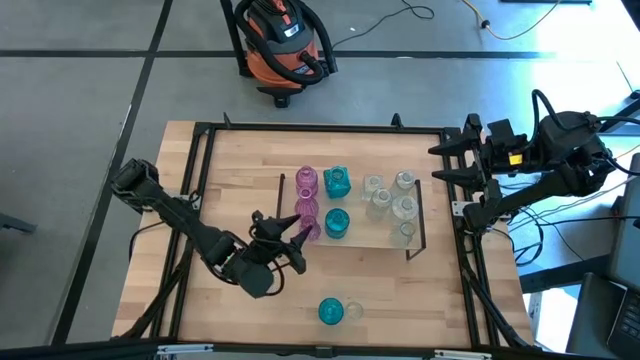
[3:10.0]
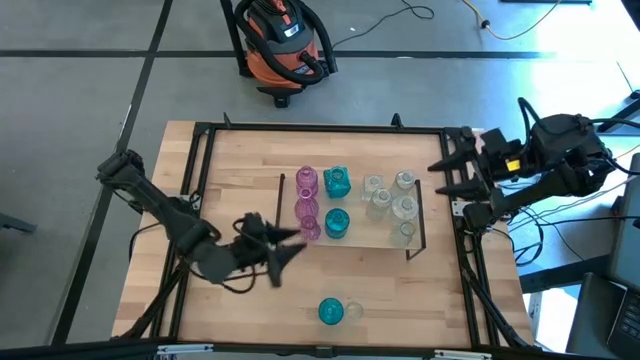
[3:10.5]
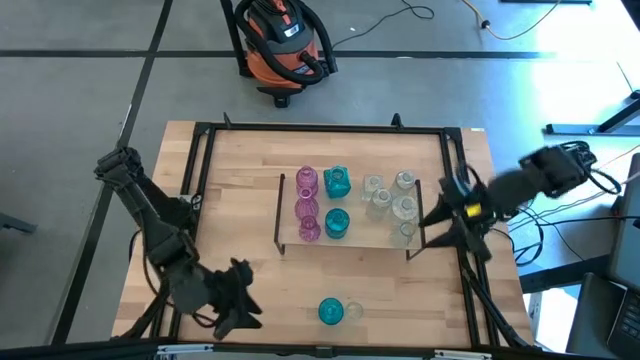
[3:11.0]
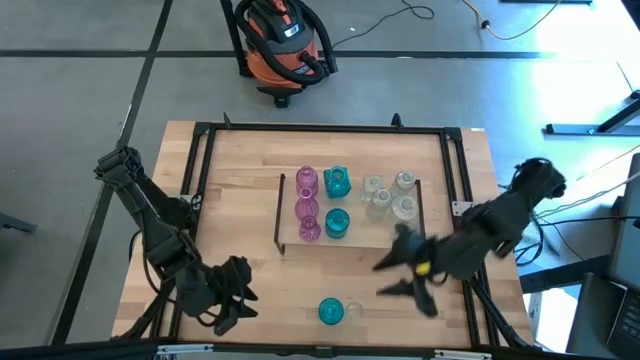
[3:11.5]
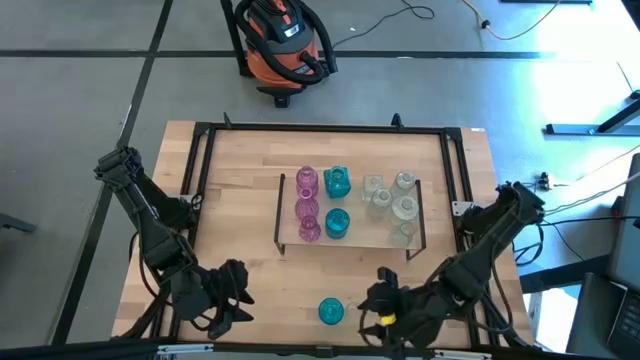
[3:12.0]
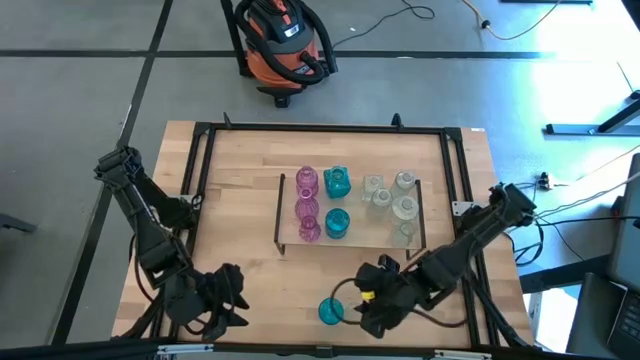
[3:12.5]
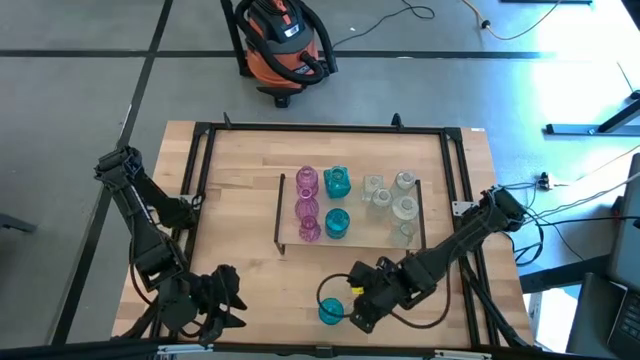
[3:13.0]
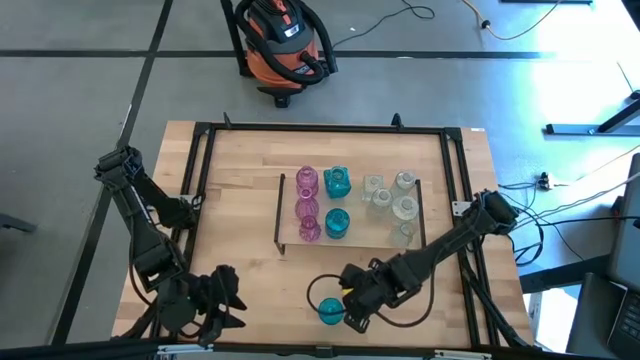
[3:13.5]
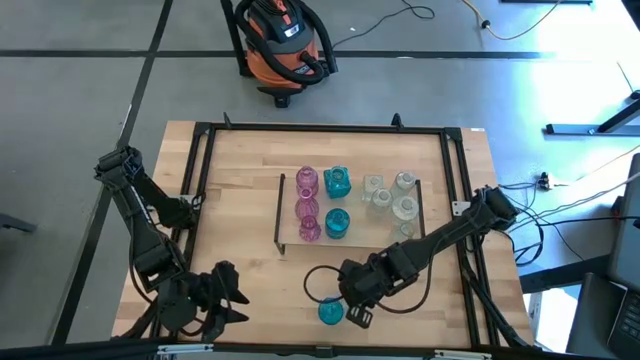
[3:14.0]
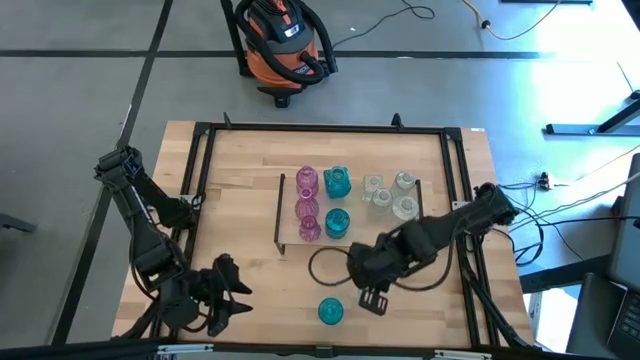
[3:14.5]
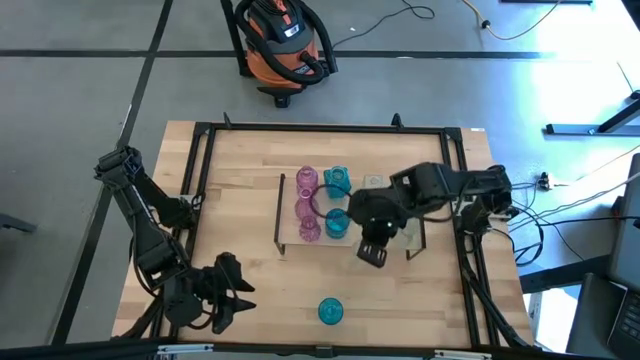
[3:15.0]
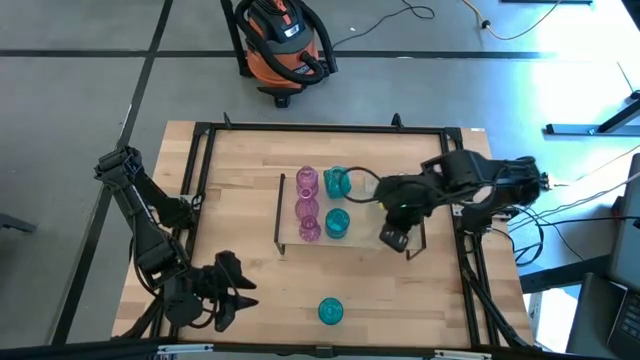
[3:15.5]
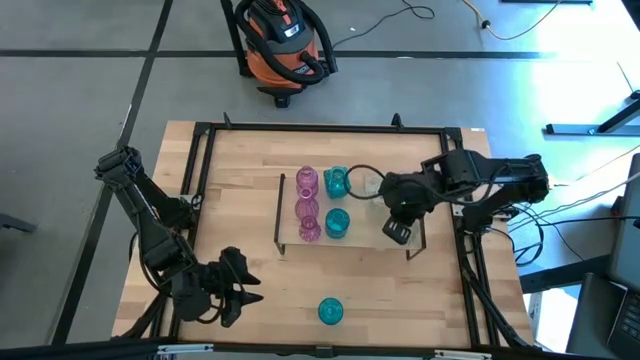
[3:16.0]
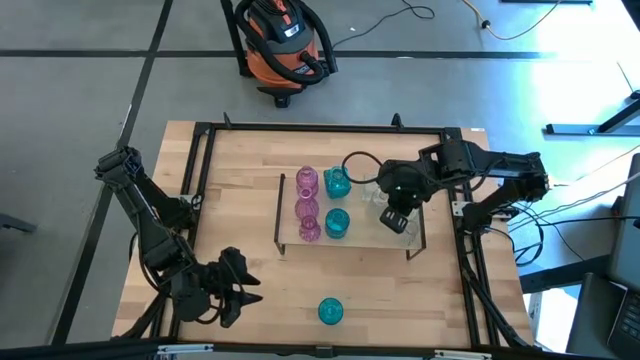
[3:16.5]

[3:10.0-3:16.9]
Task: sort vases onto shelf
Put the transparent vase on the shelf aligned with the other transparent vase

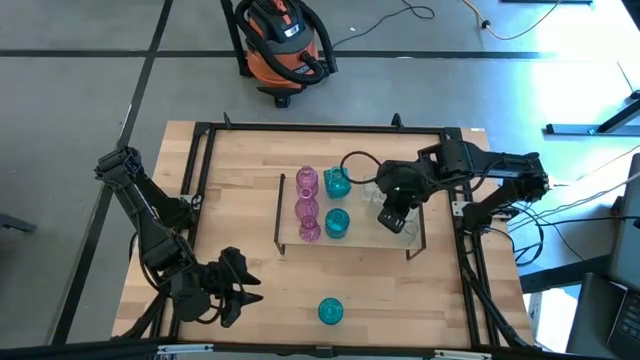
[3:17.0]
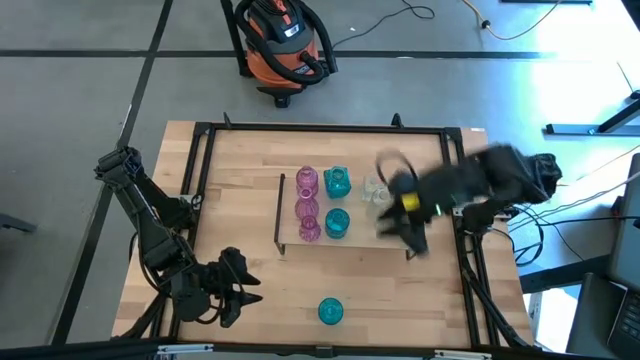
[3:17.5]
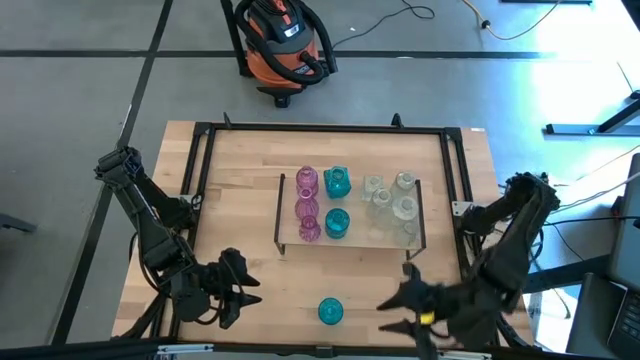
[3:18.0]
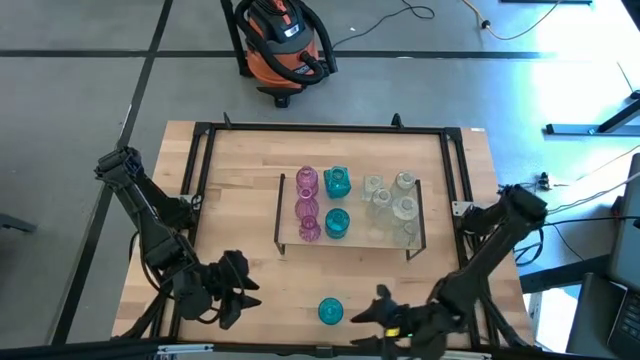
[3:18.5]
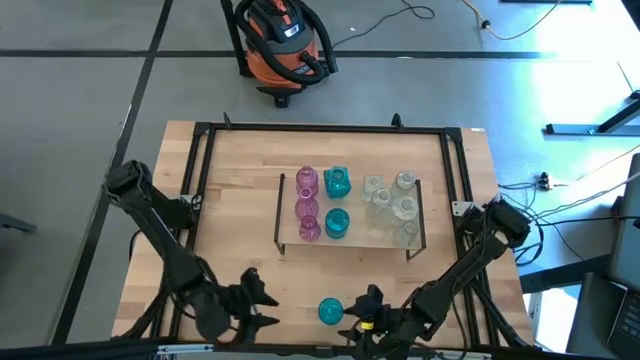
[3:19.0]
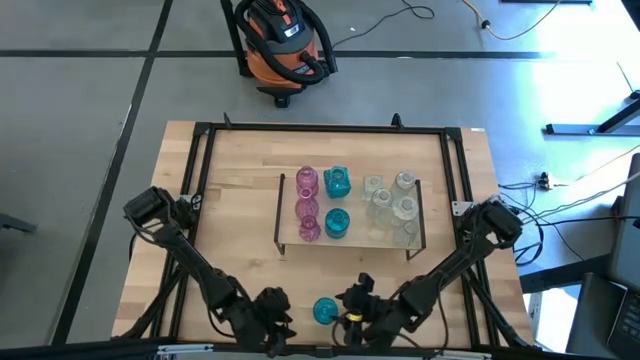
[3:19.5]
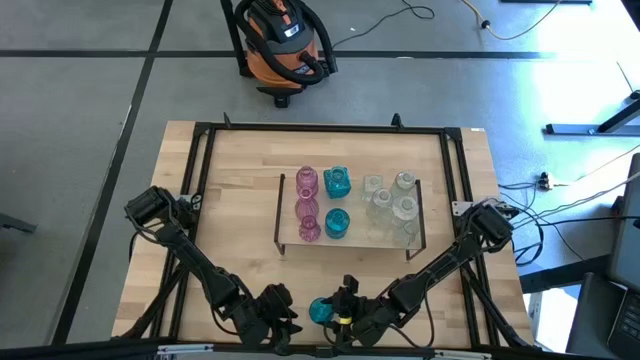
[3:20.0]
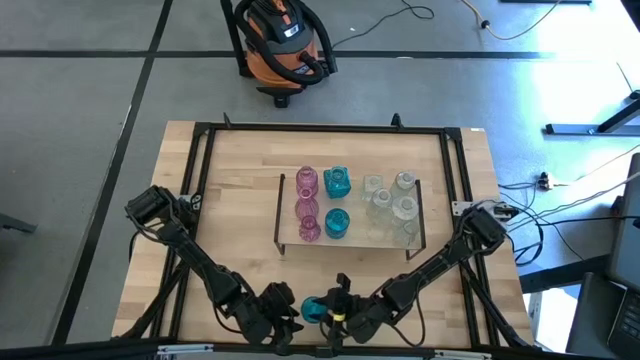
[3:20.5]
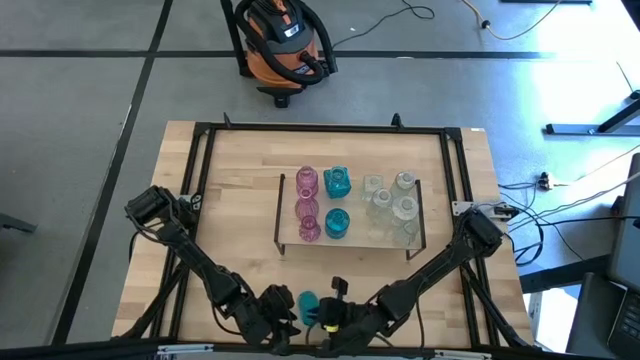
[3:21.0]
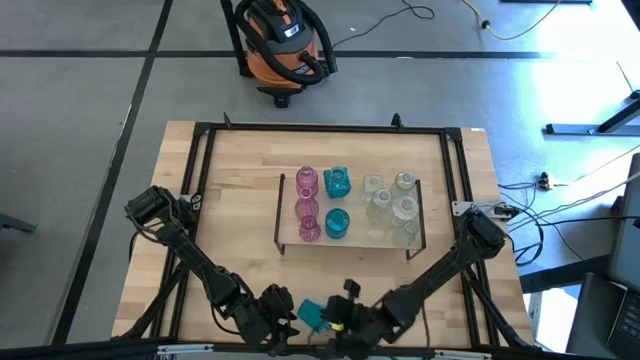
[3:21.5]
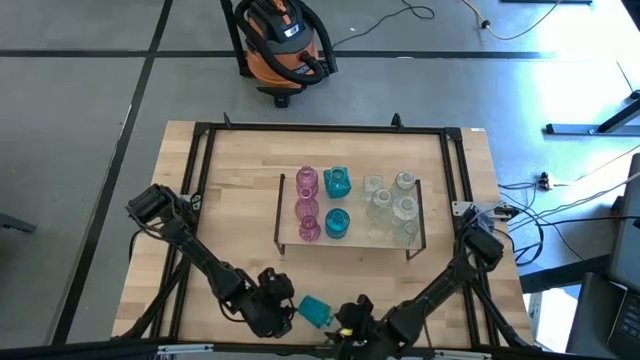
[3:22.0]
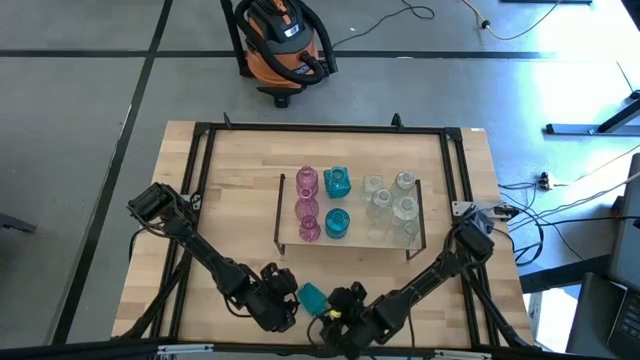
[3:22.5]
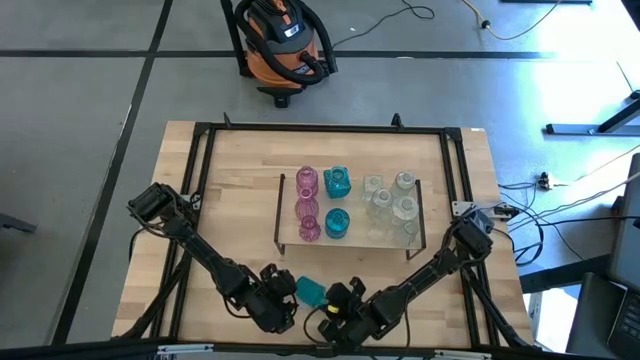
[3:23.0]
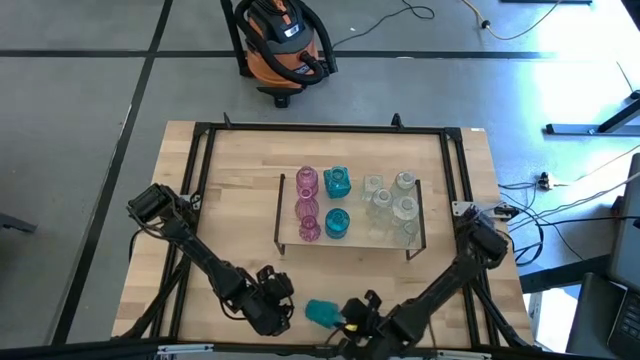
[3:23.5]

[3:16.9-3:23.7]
Put the blue vase on the shelf aligned with the other blue vase

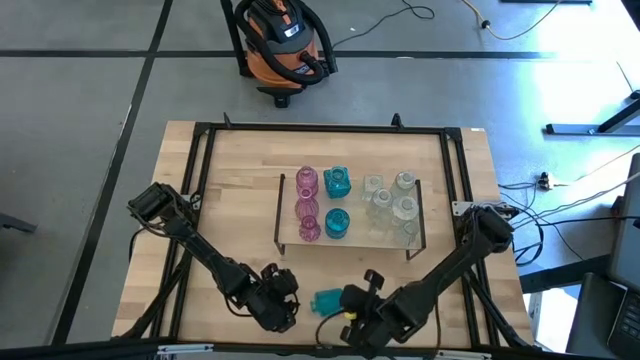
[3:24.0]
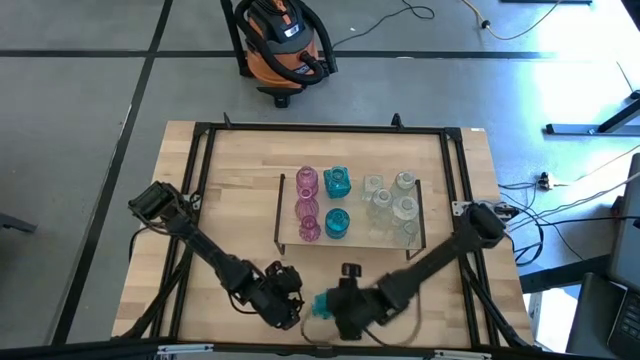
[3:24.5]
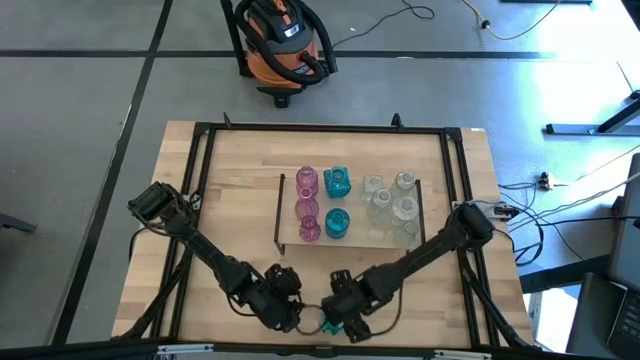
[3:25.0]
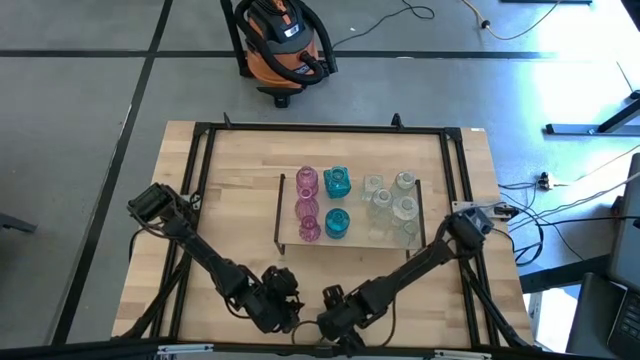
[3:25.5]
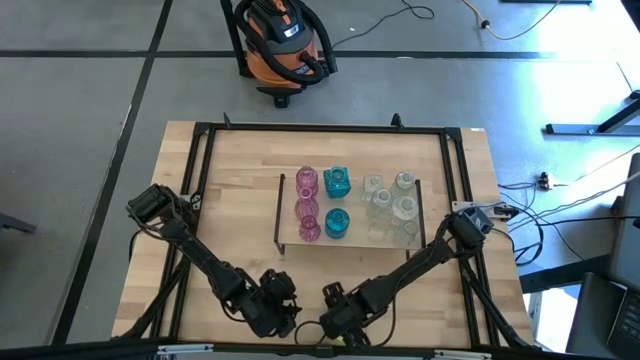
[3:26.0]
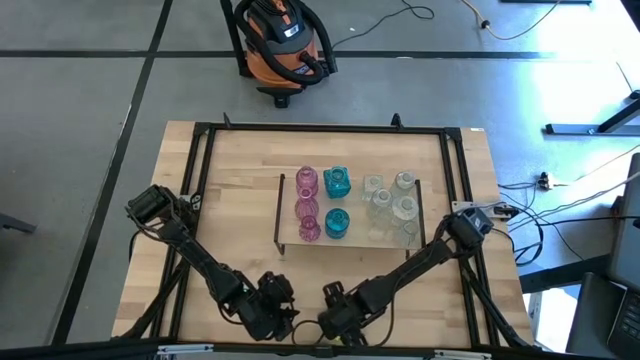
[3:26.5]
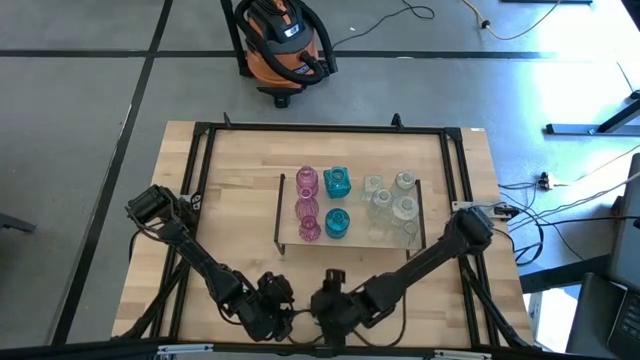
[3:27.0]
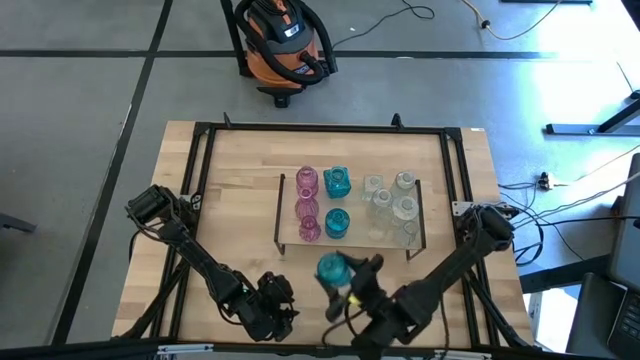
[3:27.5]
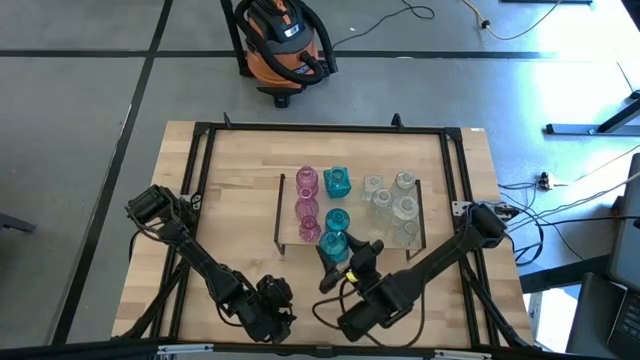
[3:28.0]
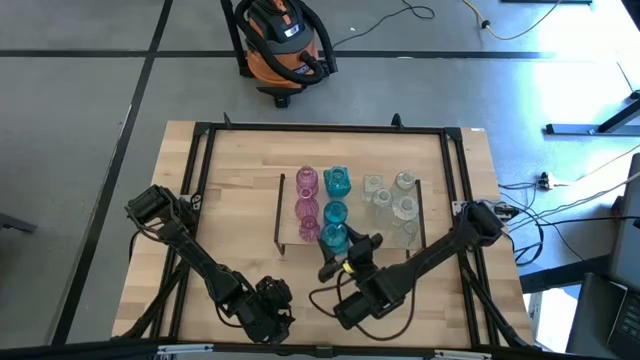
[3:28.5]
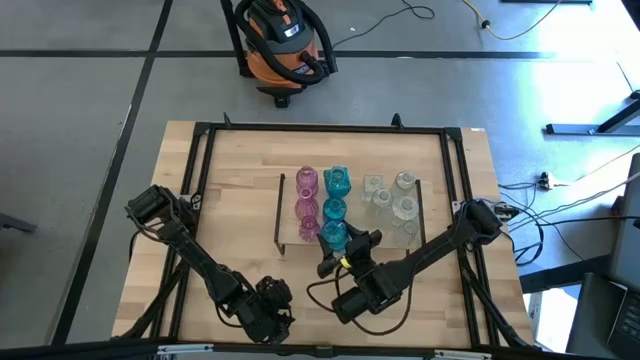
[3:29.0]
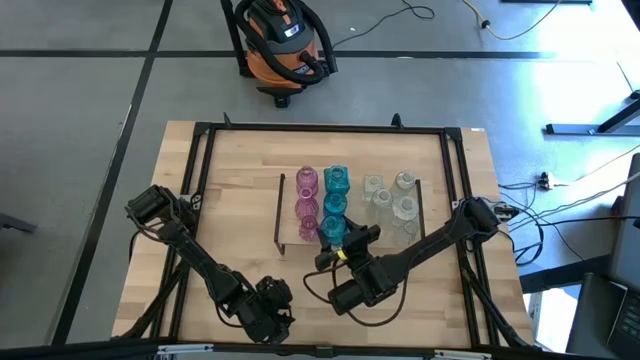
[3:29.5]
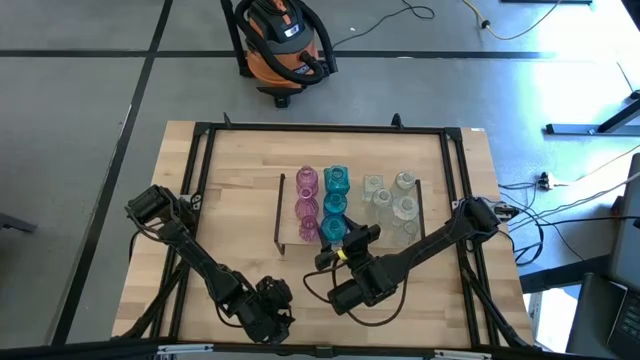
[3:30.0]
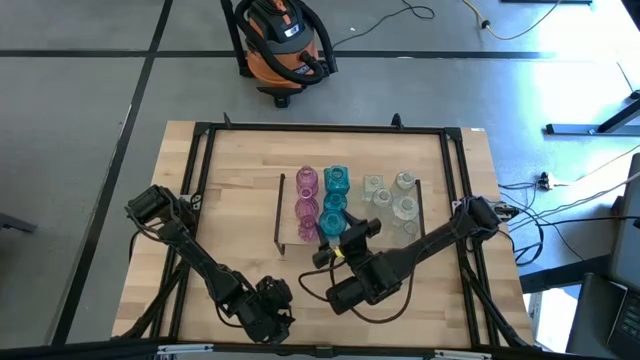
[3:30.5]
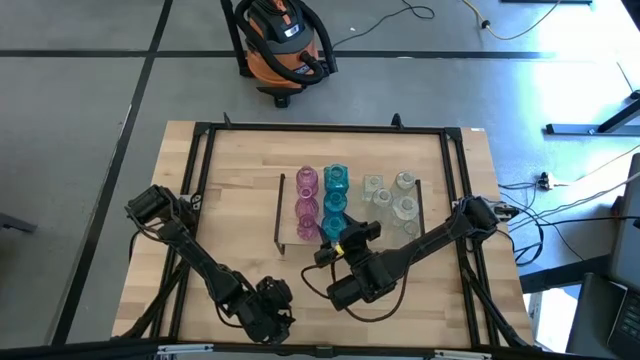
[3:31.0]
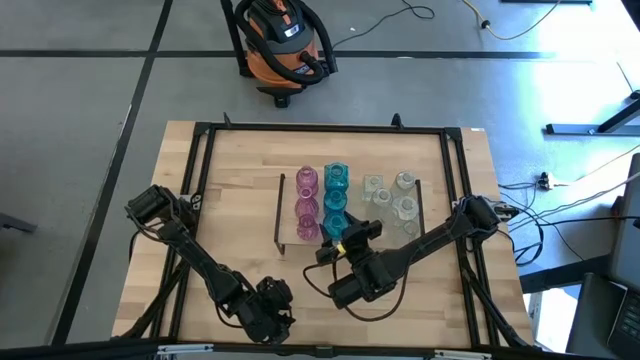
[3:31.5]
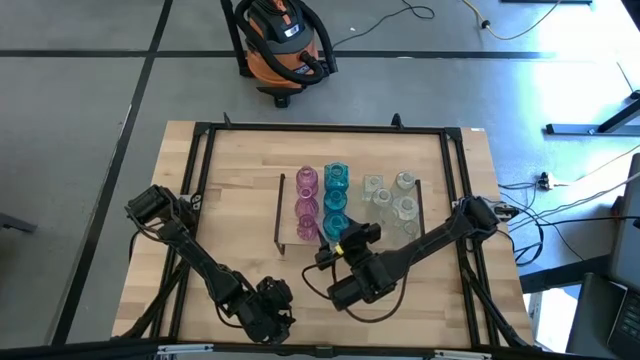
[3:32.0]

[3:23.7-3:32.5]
Put the blue vase on the shelf aligned with the other blue vase
